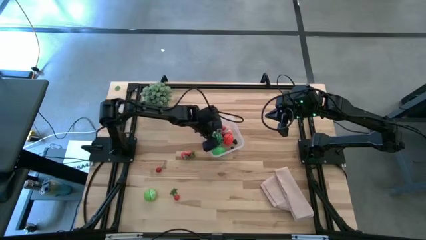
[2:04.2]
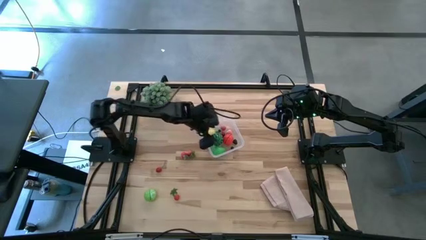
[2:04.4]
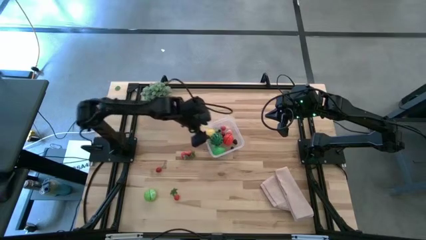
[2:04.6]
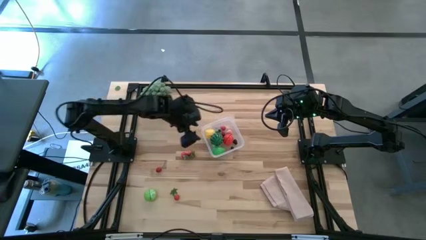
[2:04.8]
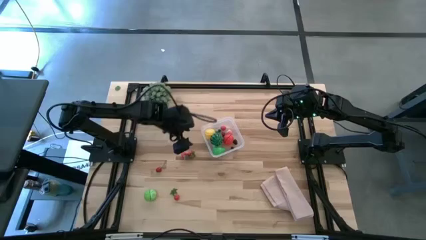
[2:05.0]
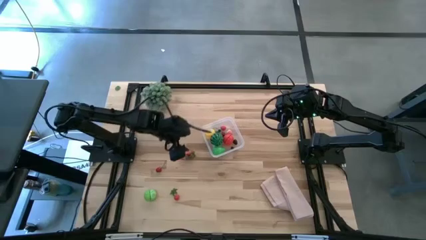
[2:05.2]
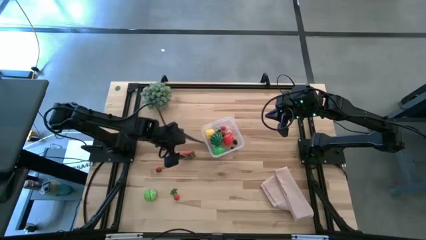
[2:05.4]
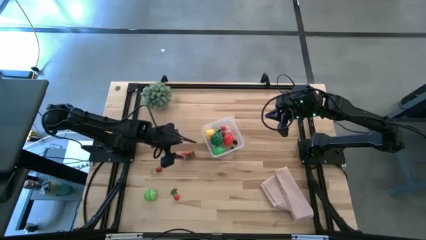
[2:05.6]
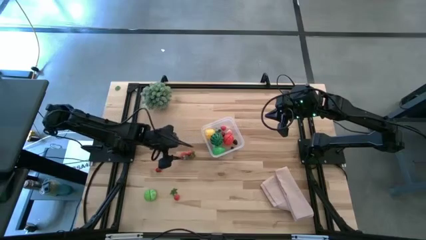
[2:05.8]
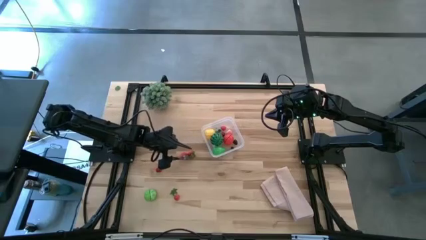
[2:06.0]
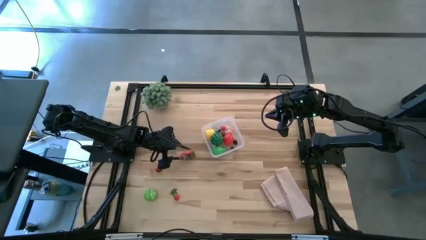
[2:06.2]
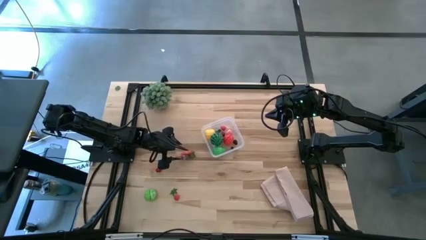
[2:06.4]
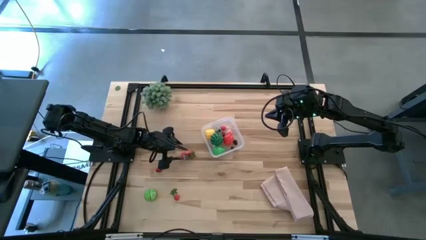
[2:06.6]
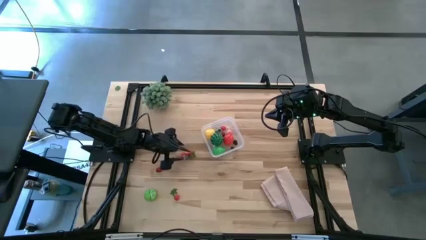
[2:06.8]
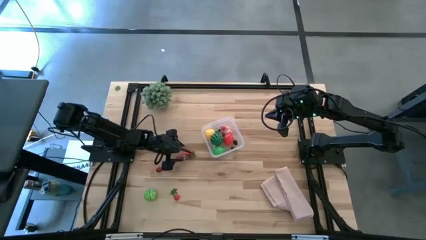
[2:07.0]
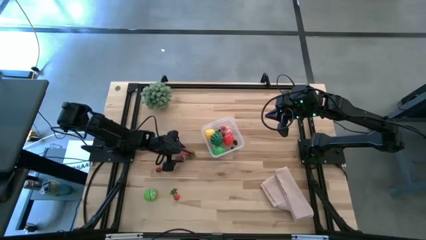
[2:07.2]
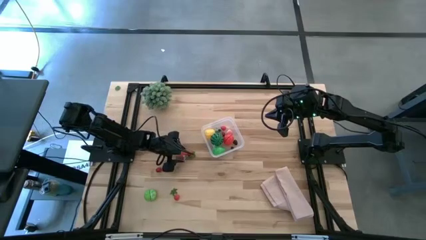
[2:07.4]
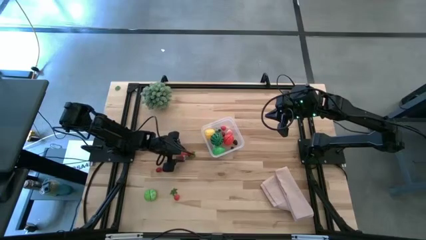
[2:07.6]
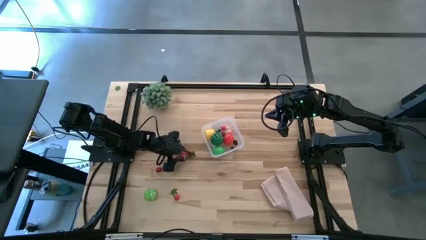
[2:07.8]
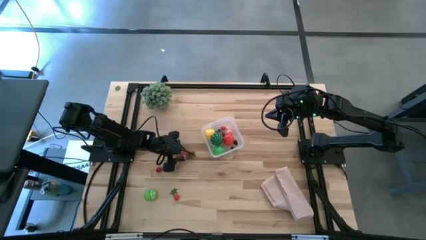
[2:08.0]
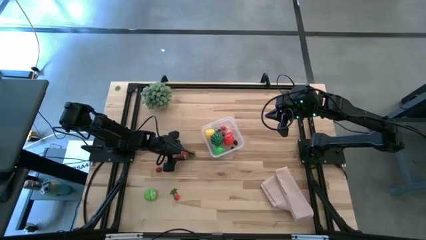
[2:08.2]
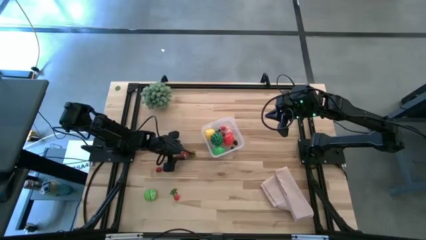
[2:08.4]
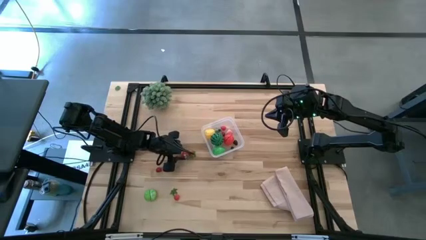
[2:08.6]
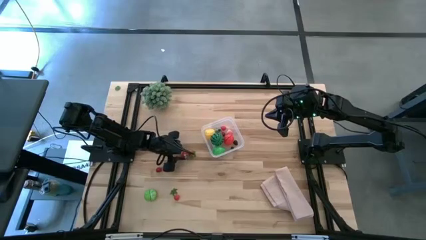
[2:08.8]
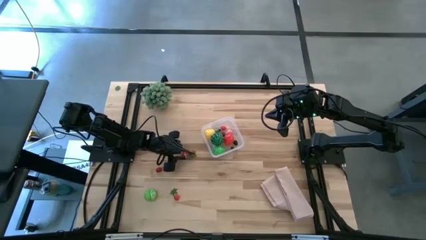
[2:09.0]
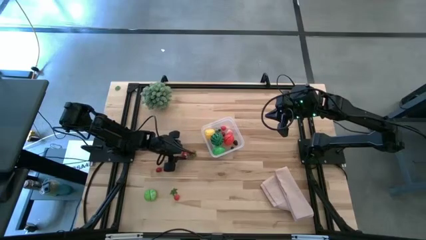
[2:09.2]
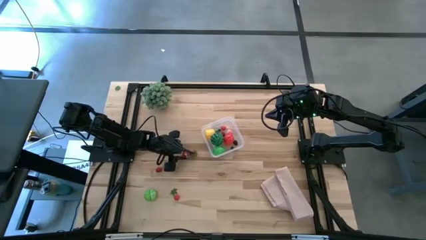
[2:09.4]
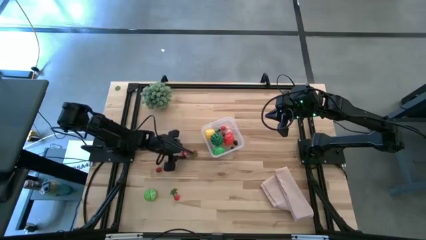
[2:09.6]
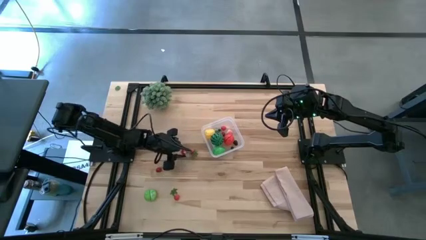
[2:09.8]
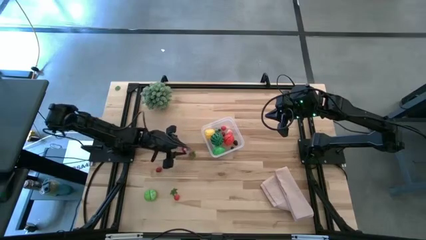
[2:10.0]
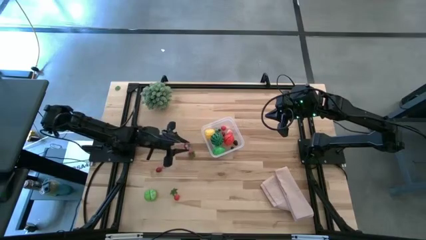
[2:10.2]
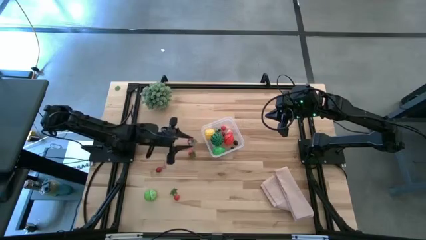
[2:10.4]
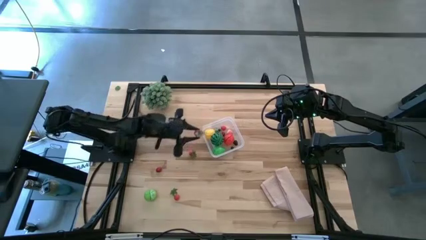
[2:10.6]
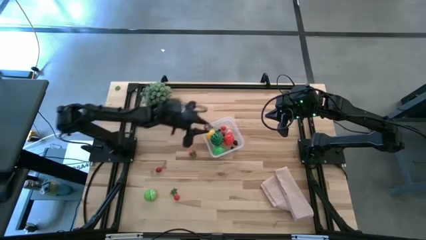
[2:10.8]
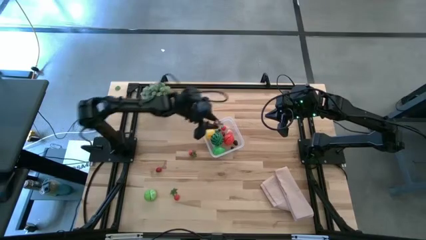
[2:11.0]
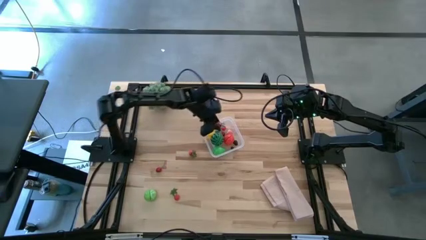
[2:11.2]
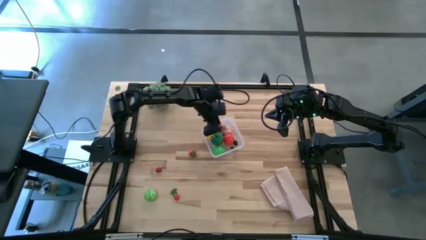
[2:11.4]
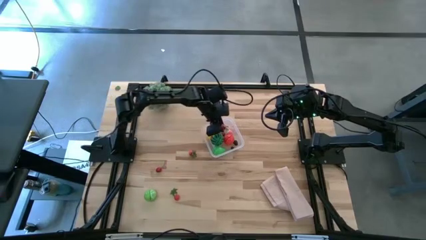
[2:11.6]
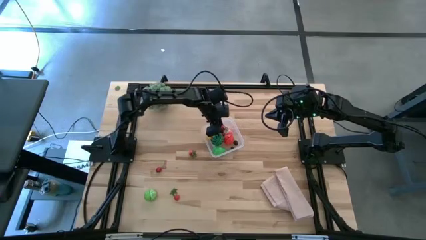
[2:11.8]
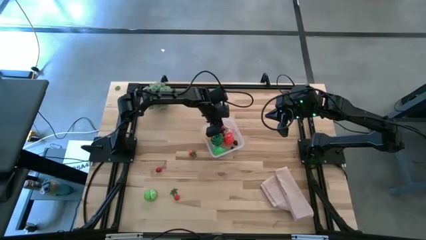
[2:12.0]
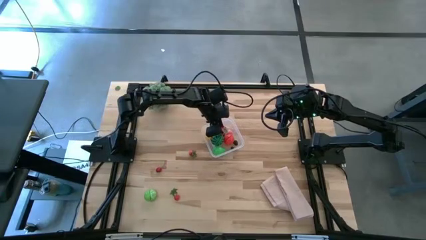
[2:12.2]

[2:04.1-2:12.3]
Task: Pick and placing Produce into tupperware
Put the red strawberry into the transparent bin

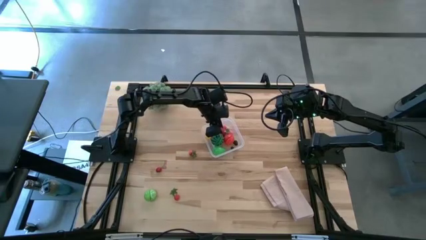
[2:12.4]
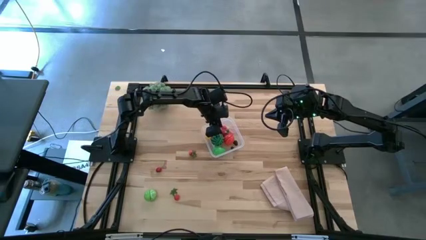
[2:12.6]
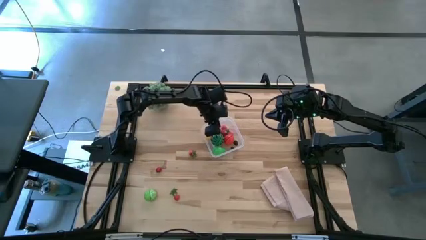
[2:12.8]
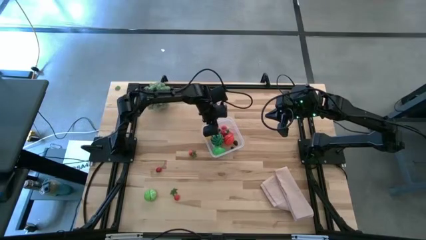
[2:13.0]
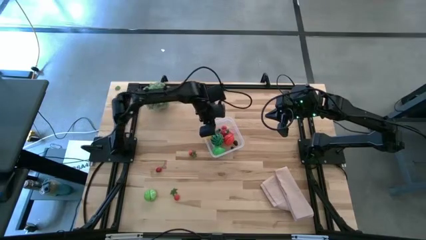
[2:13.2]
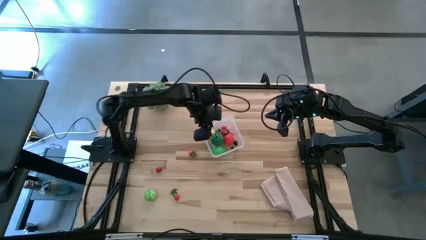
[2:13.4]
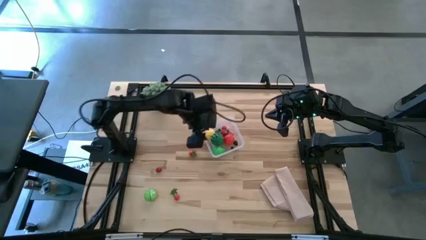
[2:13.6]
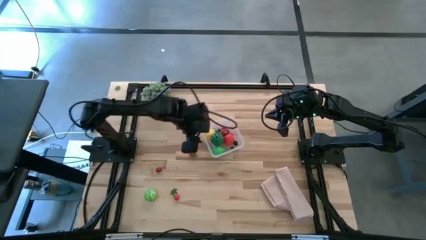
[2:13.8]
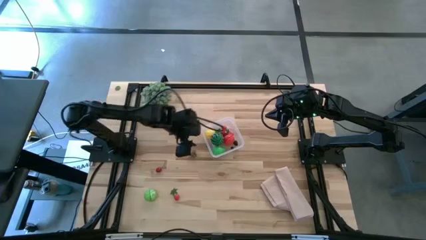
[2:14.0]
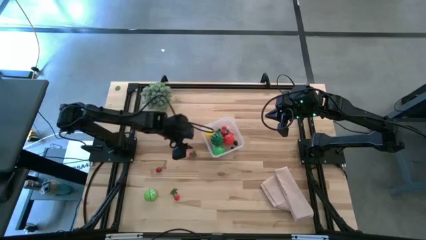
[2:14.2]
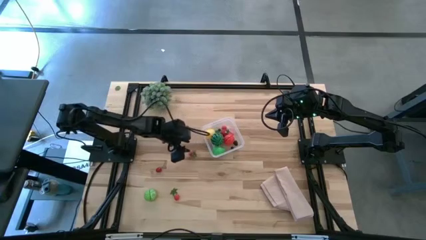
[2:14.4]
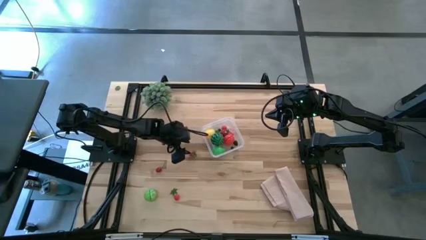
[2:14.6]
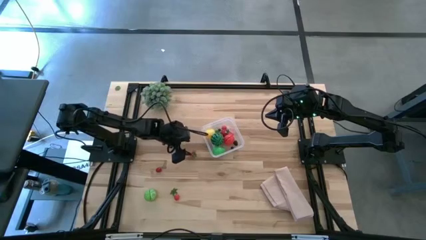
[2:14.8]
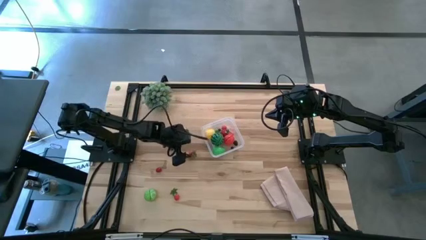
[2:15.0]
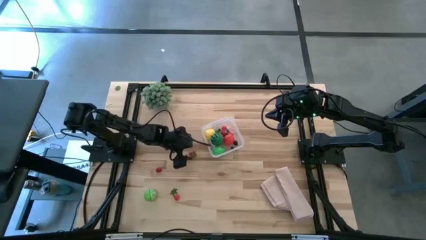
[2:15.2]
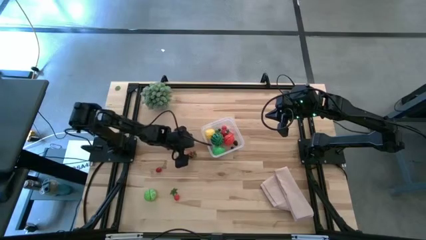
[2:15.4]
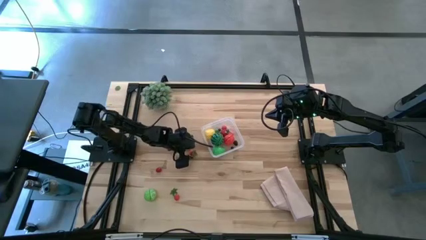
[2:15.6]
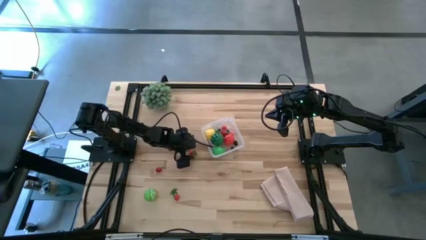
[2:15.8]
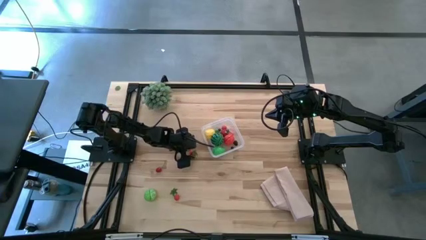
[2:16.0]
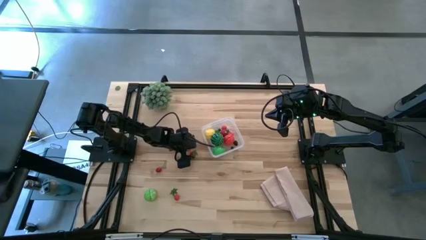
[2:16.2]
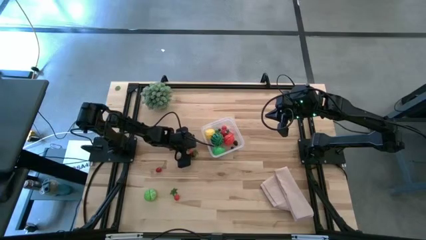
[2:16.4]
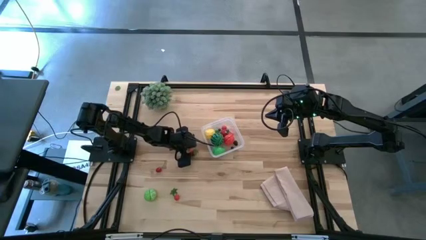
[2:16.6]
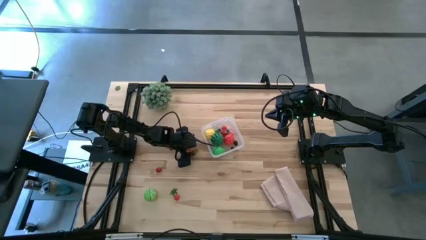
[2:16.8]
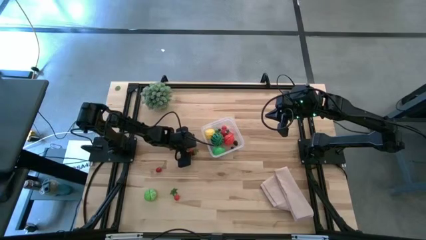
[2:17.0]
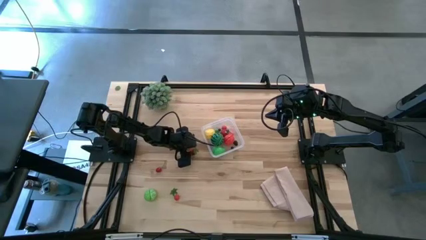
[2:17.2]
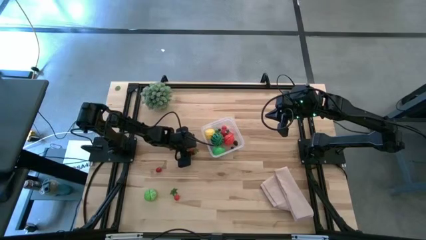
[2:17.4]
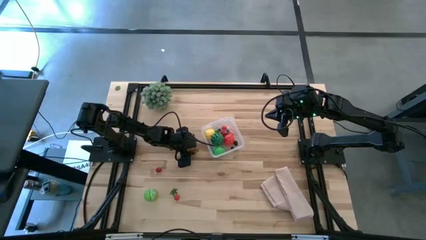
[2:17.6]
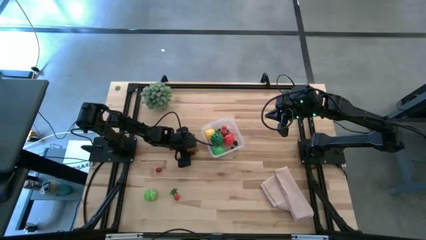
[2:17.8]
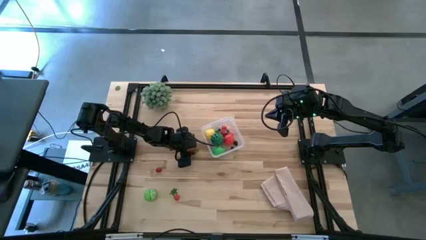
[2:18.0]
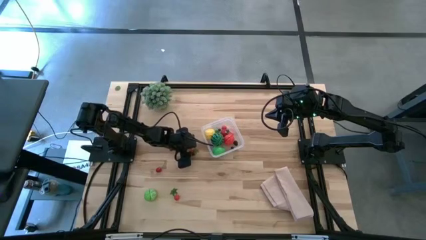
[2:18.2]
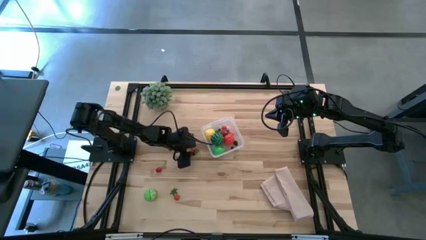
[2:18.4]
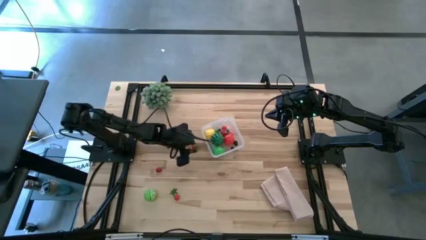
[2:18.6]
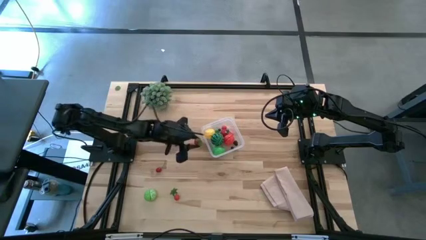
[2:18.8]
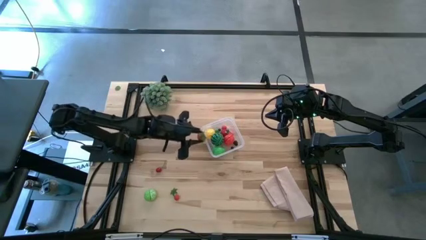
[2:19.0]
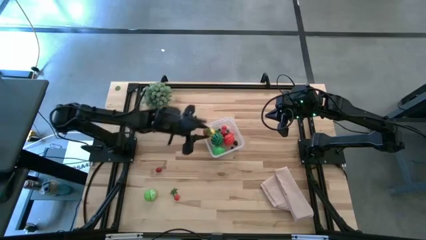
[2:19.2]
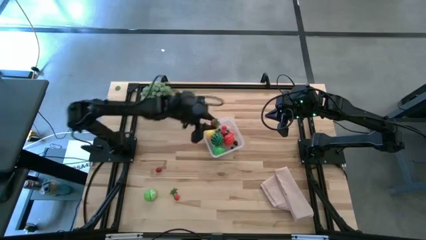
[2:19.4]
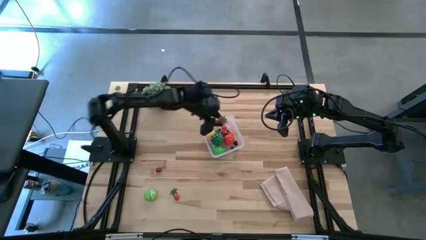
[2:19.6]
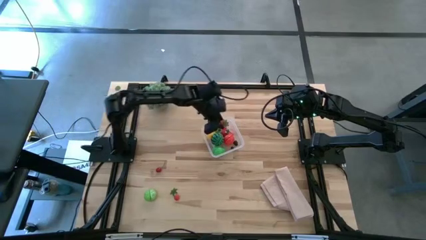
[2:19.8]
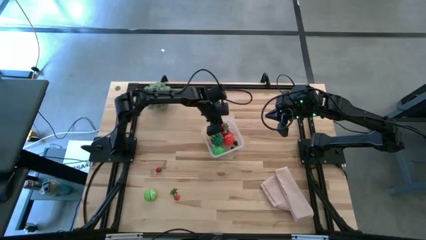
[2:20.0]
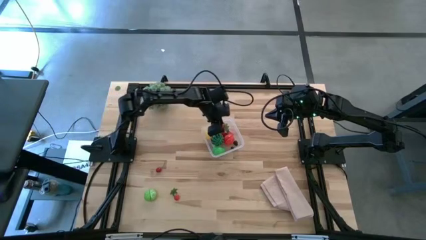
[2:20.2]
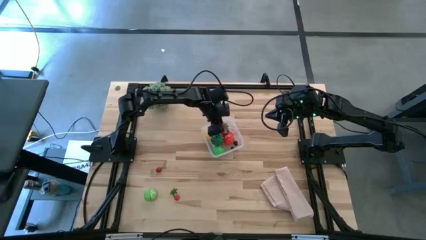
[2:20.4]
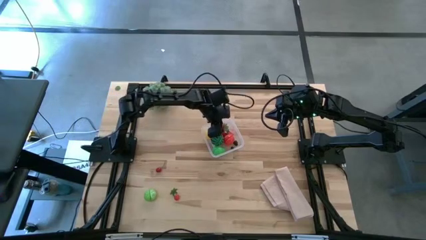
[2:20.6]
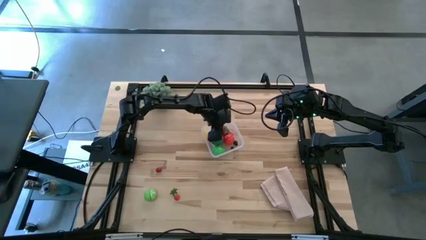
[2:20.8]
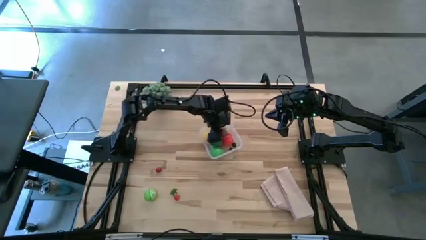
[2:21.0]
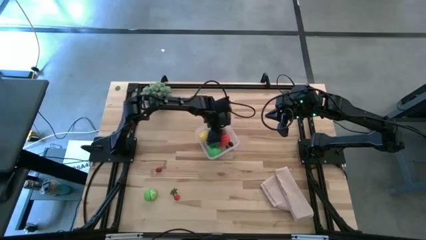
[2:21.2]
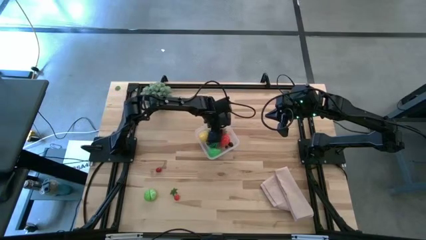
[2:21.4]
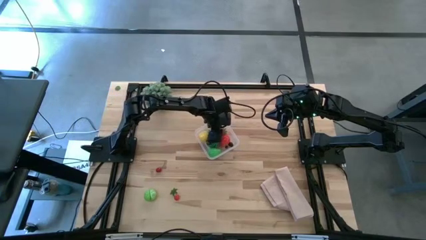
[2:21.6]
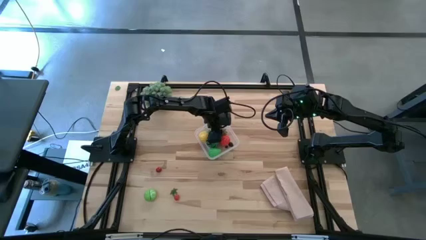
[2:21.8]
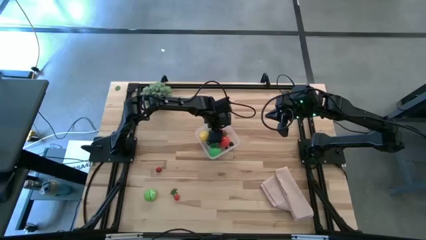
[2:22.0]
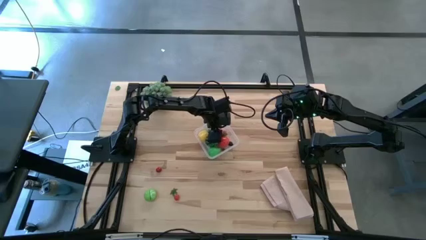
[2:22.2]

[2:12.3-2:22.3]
Put the red strawberry into the transparent bin
